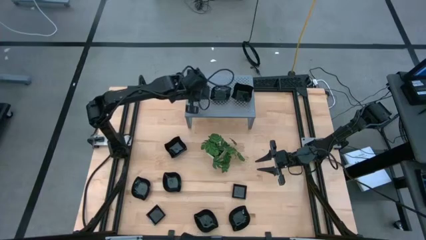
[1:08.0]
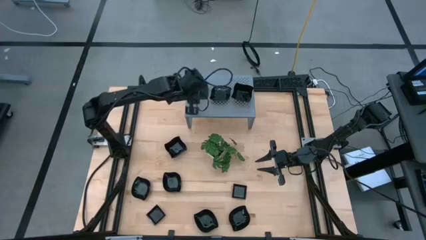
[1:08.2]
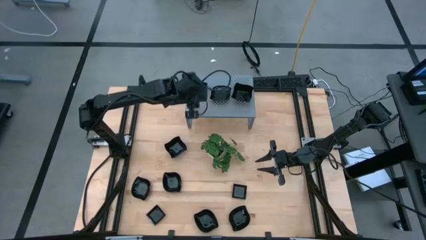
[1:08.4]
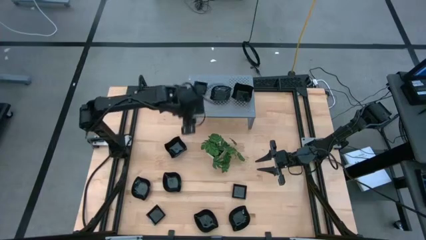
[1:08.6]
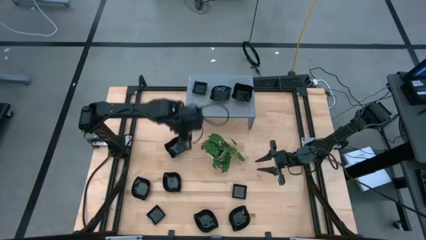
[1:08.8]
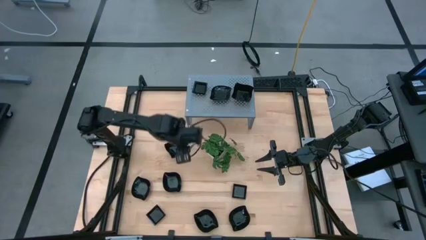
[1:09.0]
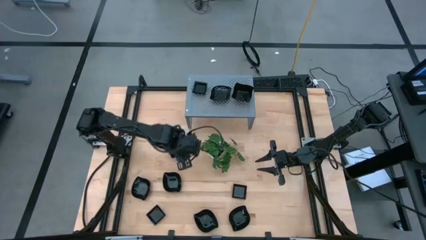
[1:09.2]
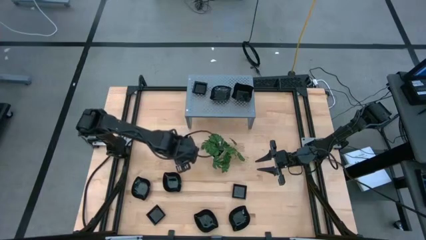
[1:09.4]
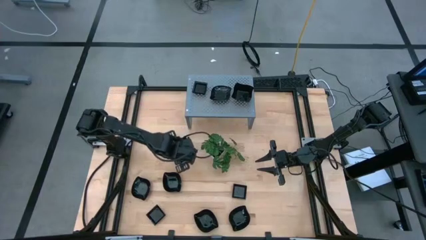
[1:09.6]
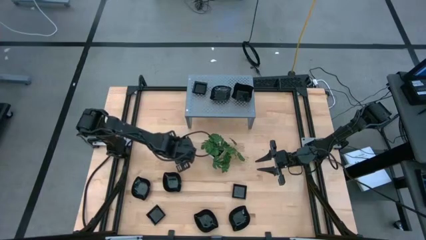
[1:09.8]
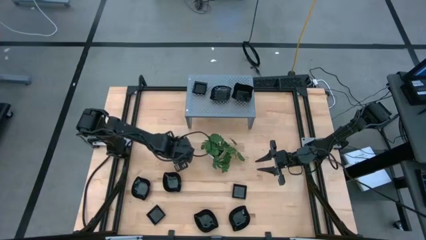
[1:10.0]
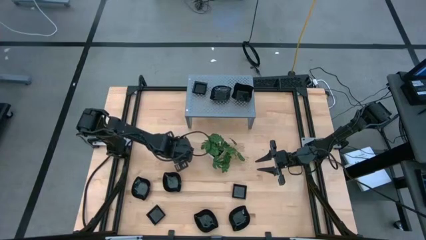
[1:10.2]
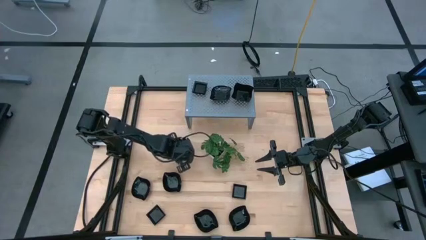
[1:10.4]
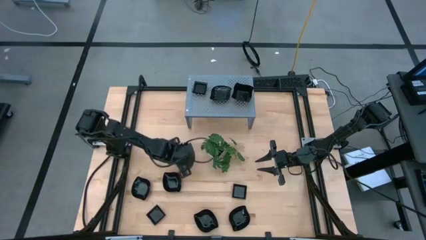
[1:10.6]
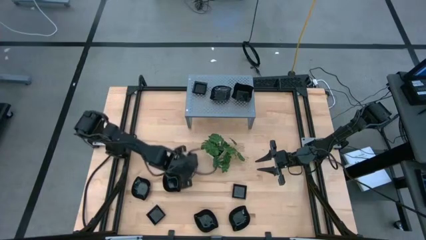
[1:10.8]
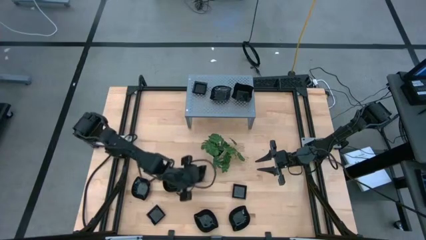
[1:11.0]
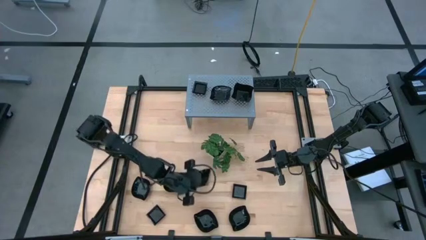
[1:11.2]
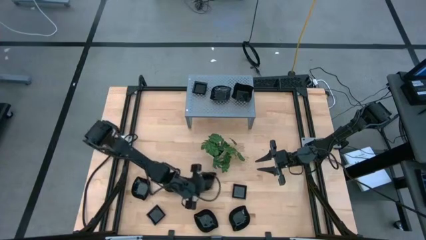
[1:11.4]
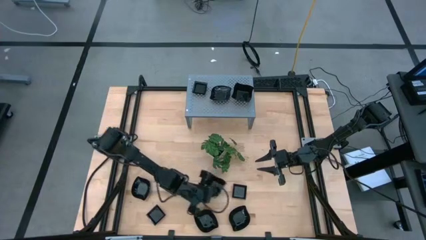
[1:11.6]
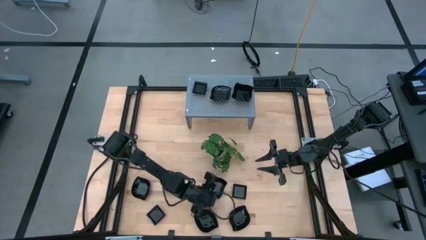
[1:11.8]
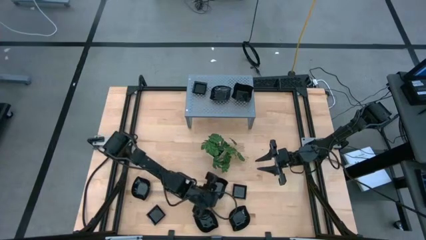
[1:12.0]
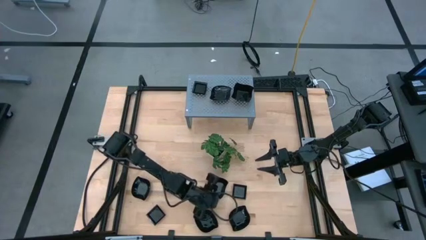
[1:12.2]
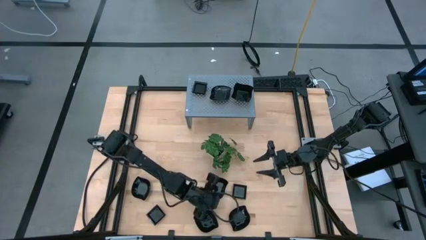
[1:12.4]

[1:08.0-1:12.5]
Task: Pick & Place Mini shaped plates
Stack the distorted square black bowl on top of the other distorted square black bowls on the shelf

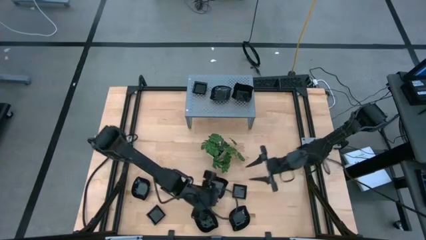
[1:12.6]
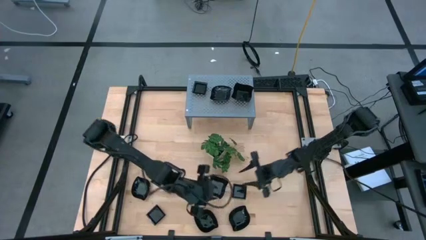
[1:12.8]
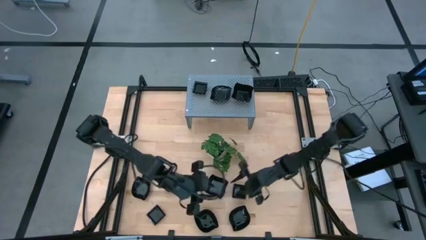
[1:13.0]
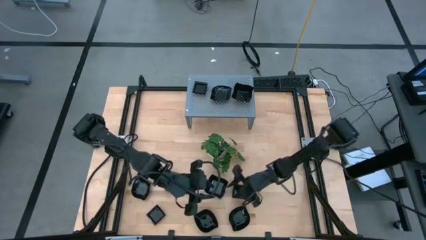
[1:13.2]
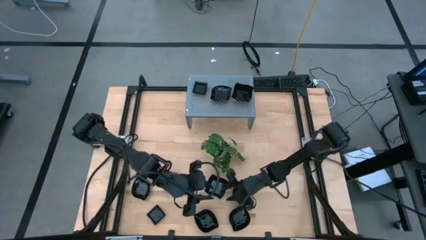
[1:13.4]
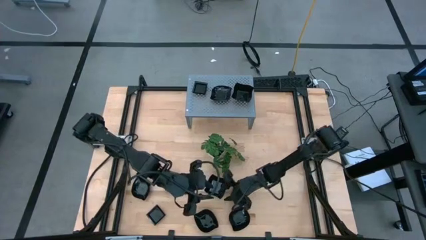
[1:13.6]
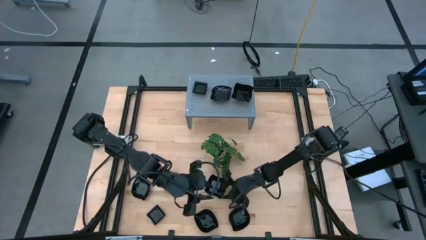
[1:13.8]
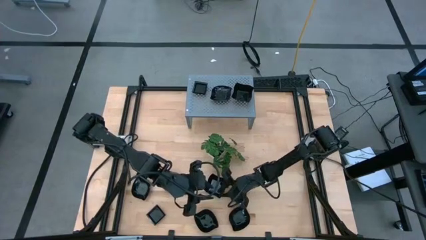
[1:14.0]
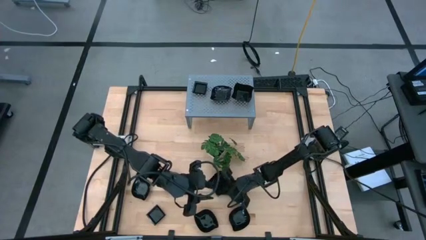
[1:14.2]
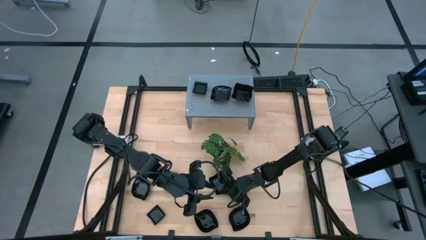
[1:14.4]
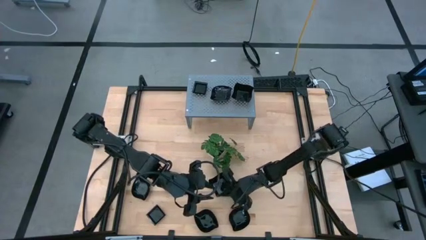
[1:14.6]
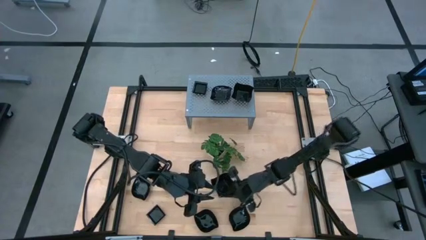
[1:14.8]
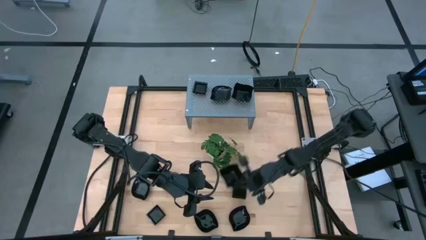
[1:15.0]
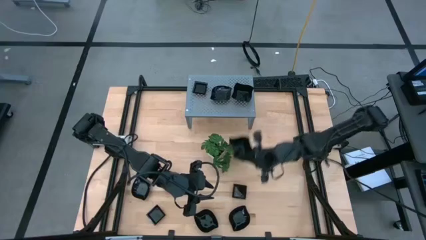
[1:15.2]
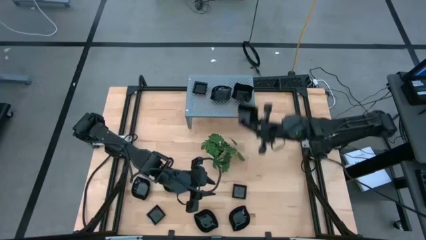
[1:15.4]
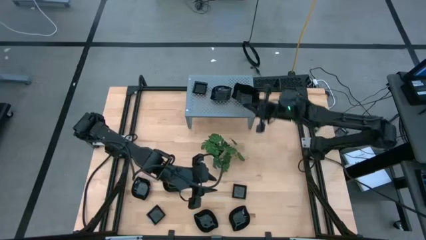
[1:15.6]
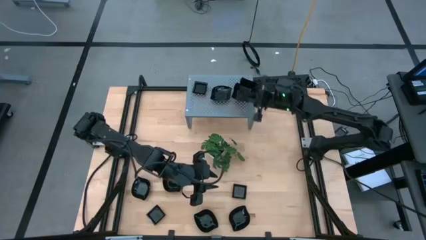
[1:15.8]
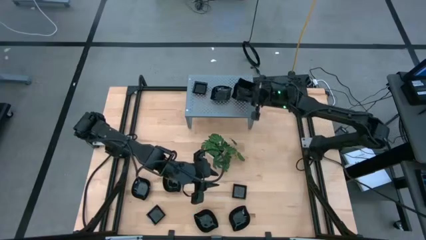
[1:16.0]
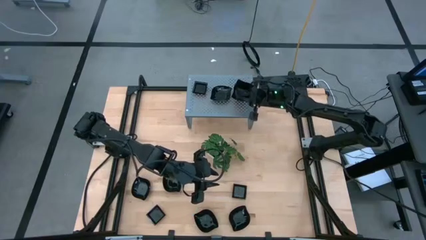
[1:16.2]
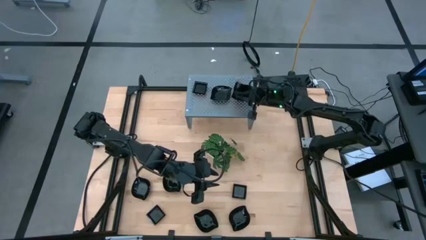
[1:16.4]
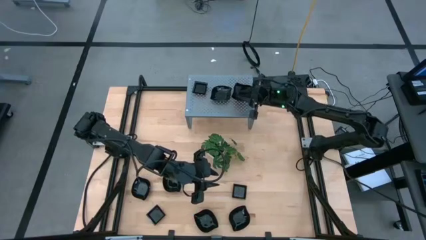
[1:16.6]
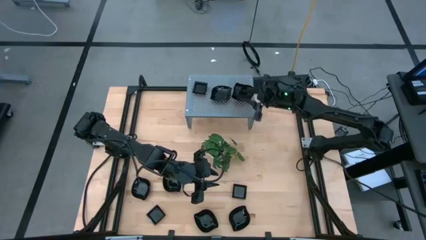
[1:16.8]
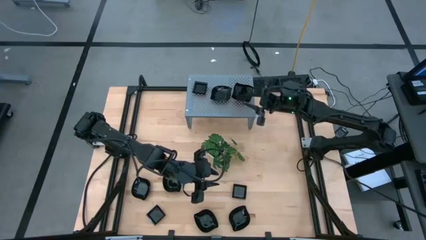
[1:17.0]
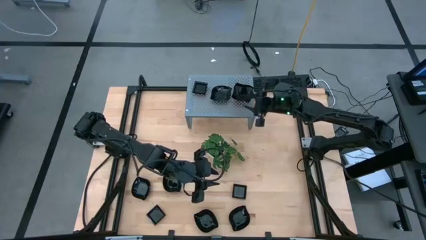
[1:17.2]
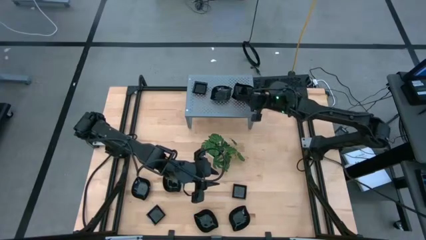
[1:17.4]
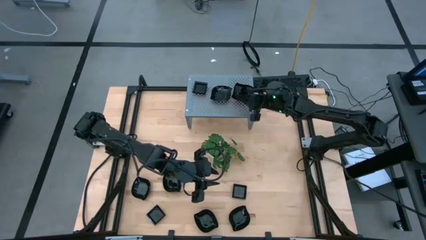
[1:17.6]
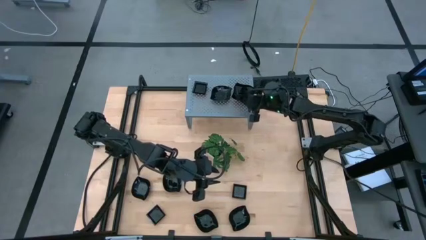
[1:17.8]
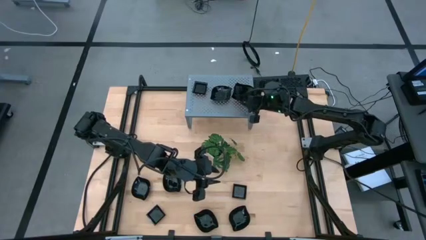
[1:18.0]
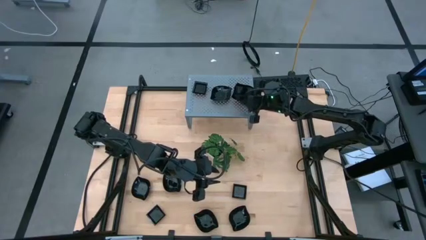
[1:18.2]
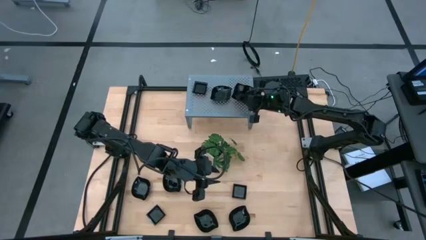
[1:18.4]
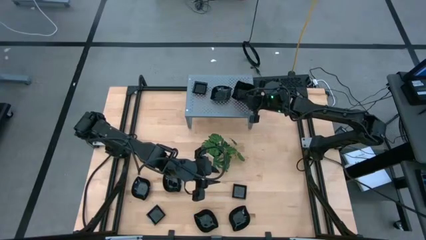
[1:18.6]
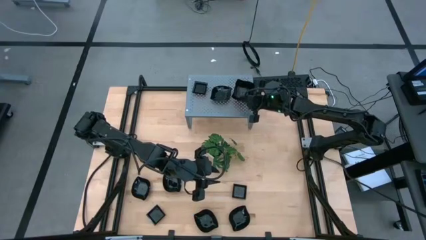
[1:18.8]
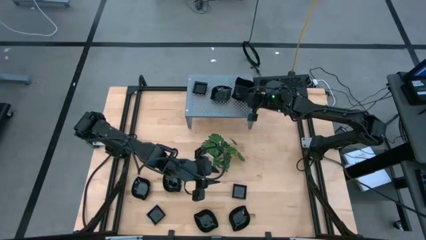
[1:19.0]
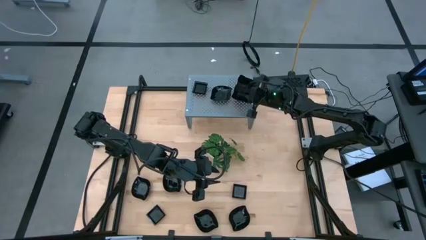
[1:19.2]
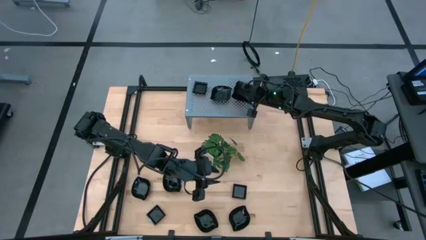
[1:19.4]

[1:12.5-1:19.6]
Stack the distorted square black bowl on top of the other distorted square black bowls on the shelf

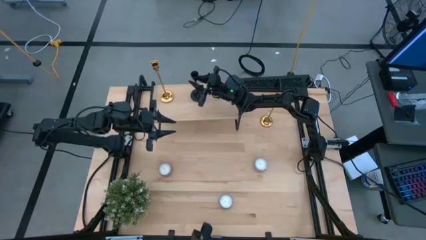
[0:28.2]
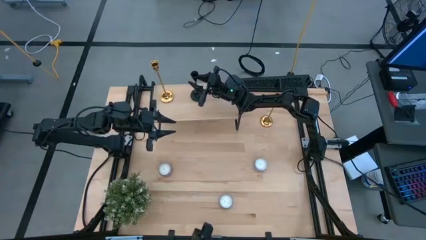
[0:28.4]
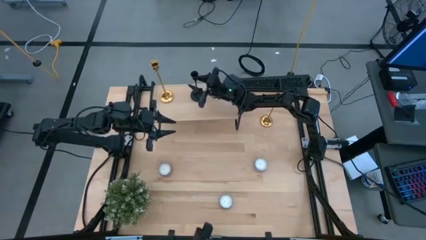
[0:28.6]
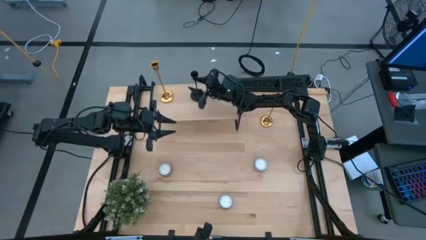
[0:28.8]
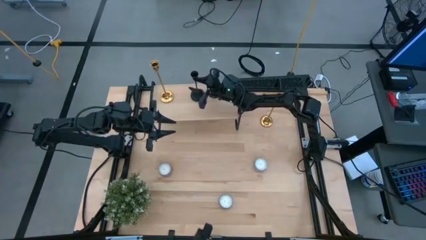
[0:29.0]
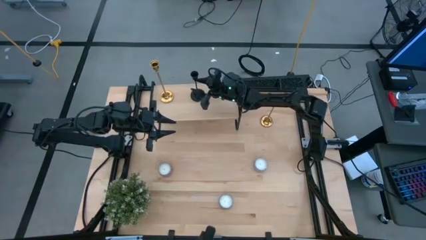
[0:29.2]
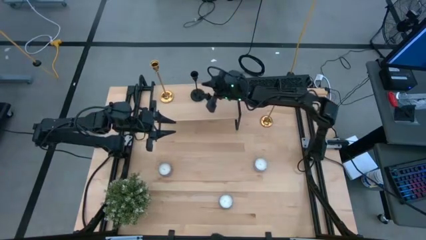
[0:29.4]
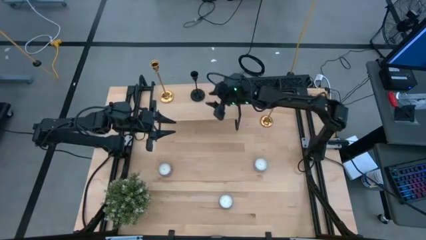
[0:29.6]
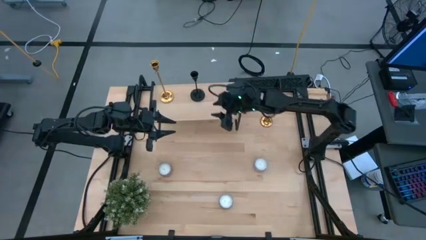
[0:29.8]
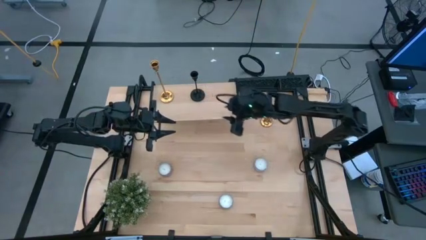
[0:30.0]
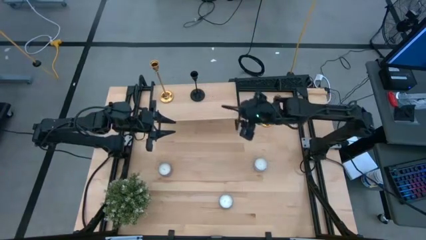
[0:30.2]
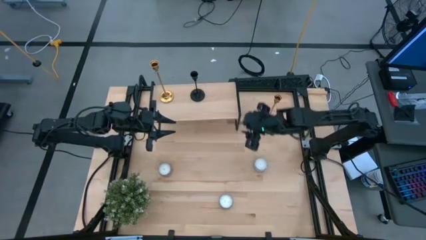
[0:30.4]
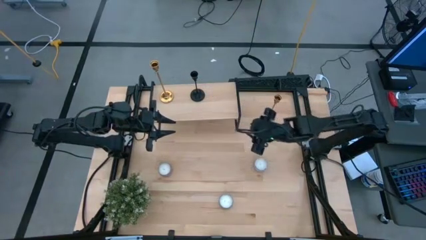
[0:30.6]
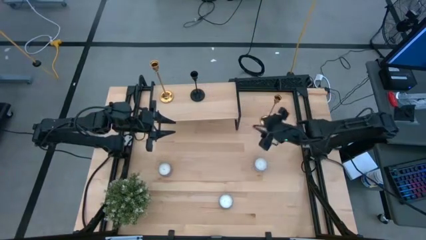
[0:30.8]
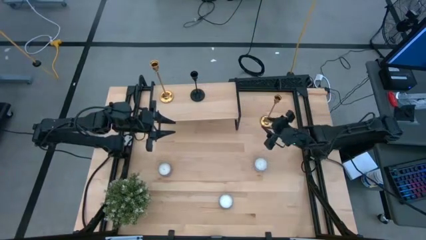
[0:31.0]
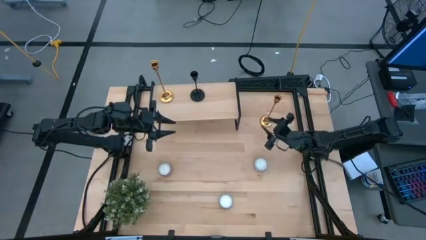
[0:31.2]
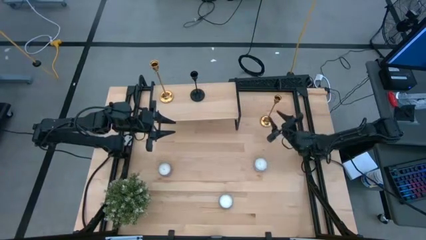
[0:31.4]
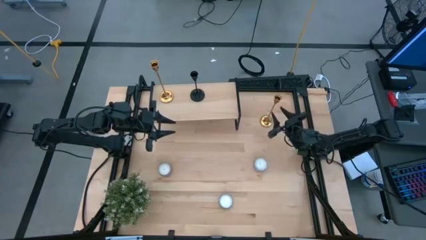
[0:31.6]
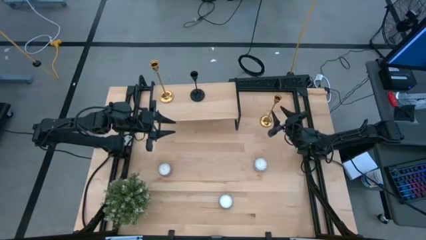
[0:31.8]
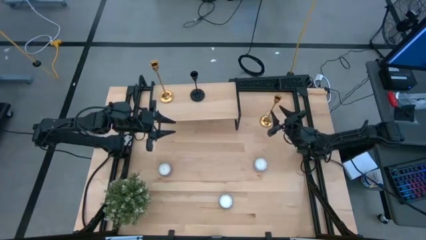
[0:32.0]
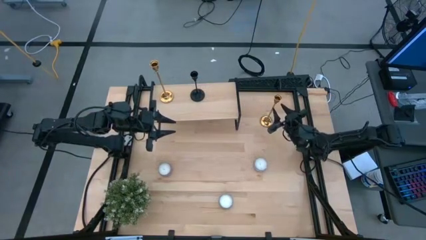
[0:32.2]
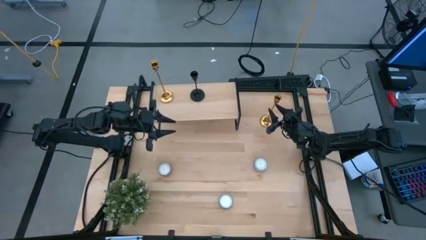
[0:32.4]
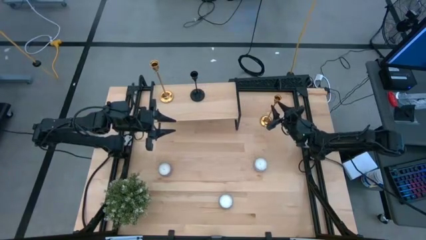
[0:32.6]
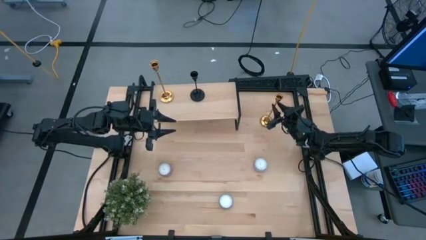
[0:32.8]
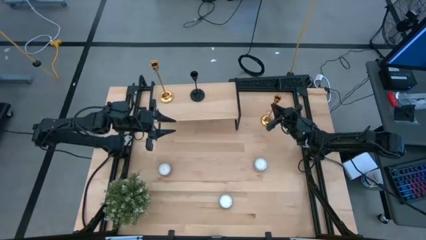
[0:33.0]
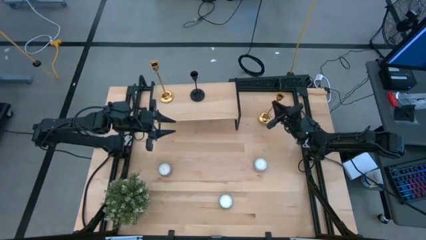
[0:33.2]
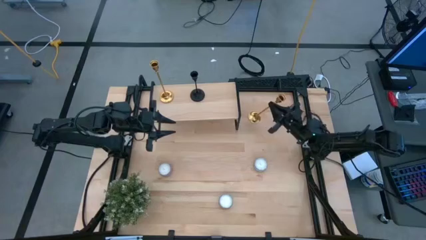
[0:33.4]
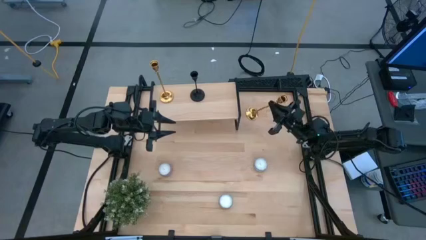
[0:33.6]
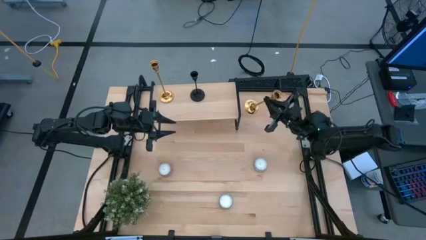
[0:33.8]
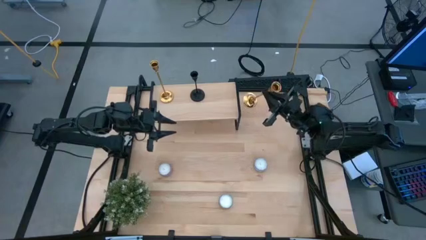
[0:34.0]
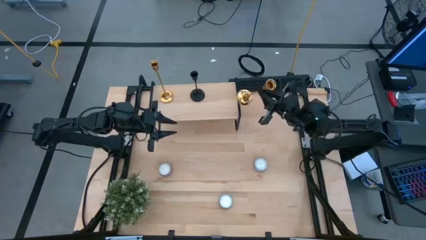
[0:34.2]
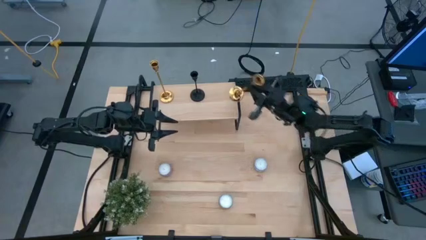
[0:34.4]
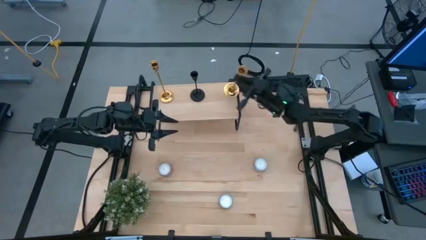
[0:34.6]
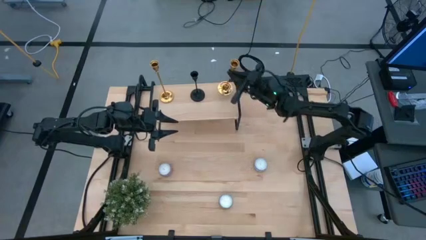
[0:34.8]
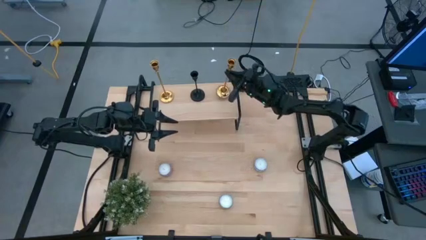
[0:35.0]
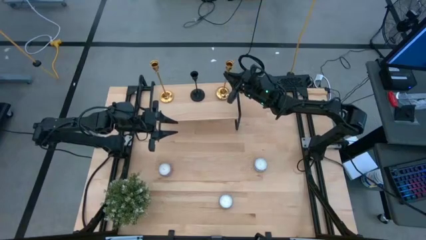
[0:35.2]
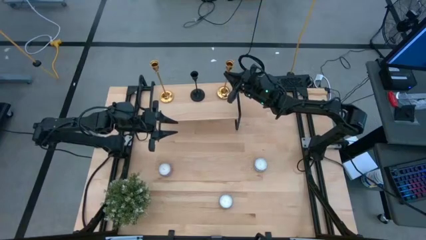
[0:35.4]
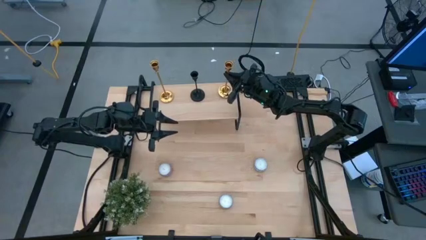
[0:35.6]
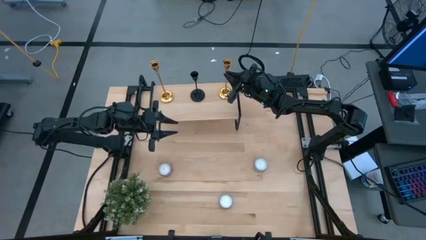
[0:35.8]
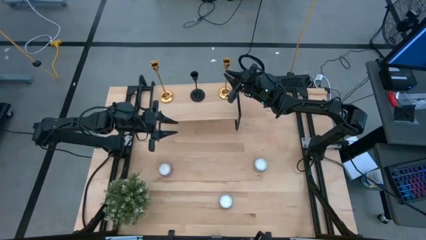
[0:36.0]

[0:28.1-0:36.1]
Task: Pick & Place candle stick holders
Put the gold candle holder on the shelf aligned with the other candle holders
